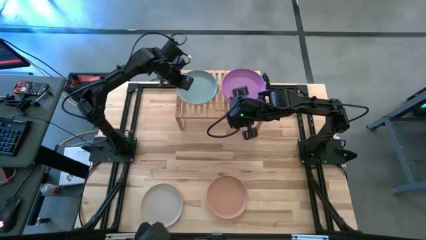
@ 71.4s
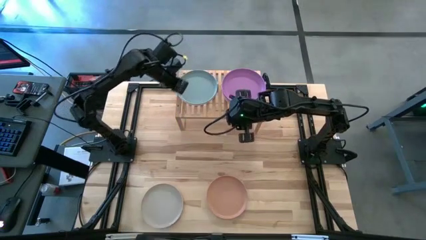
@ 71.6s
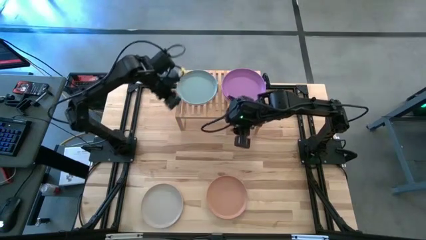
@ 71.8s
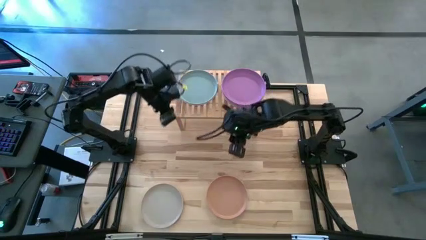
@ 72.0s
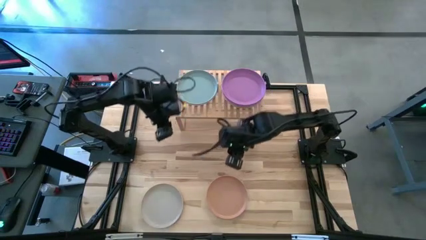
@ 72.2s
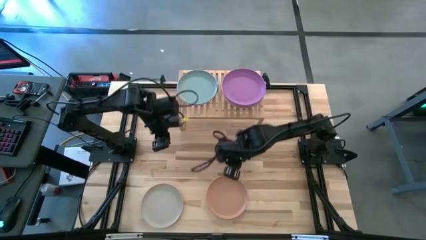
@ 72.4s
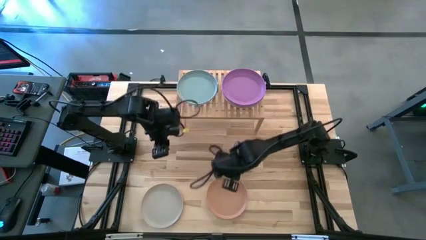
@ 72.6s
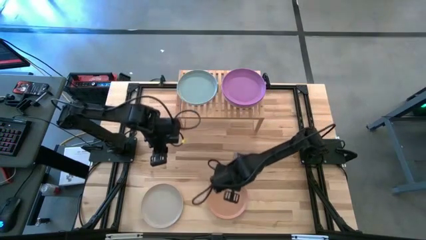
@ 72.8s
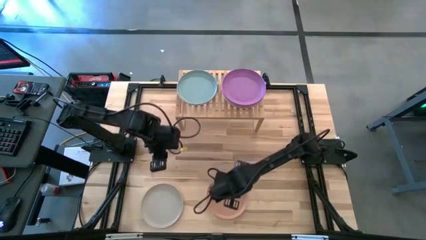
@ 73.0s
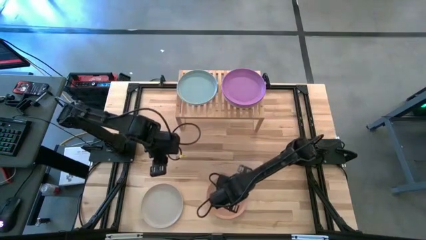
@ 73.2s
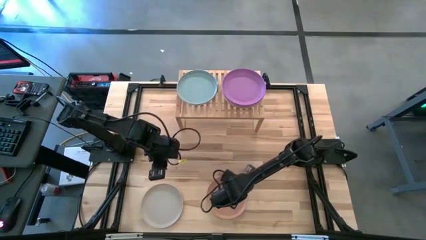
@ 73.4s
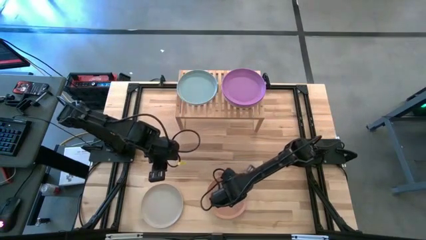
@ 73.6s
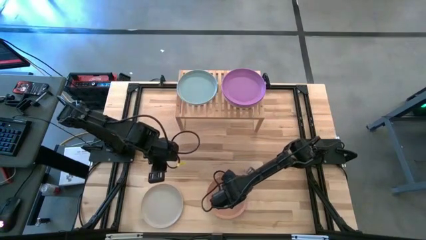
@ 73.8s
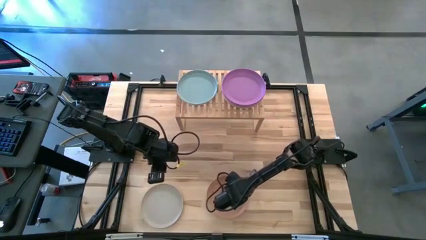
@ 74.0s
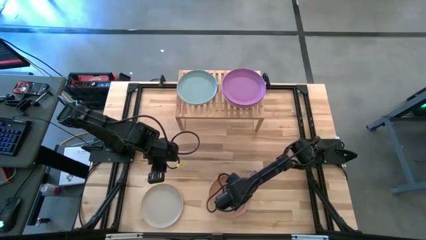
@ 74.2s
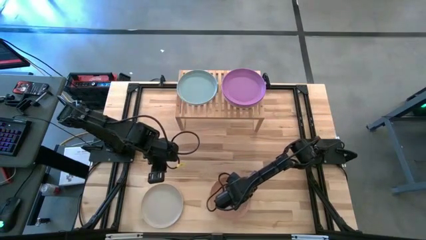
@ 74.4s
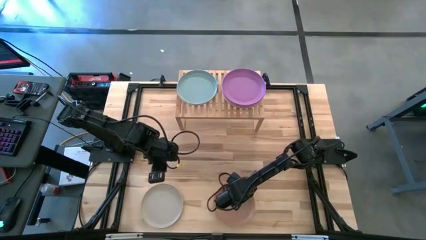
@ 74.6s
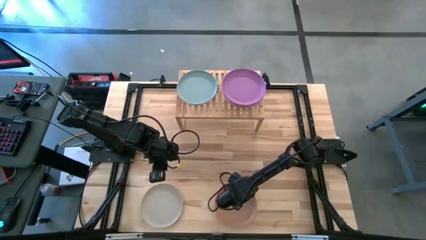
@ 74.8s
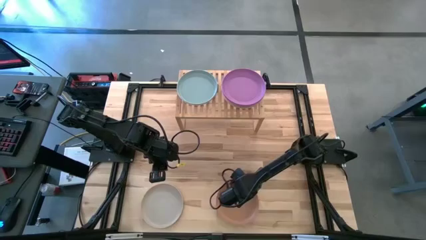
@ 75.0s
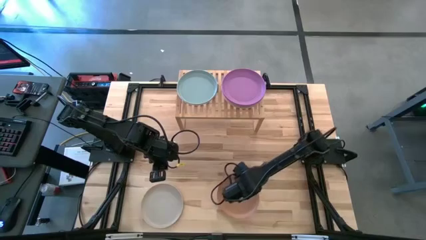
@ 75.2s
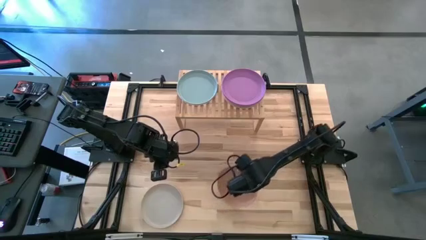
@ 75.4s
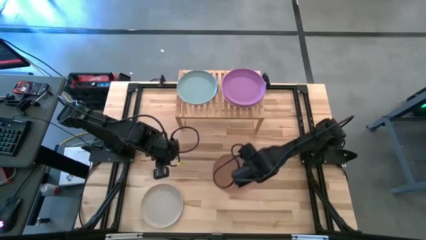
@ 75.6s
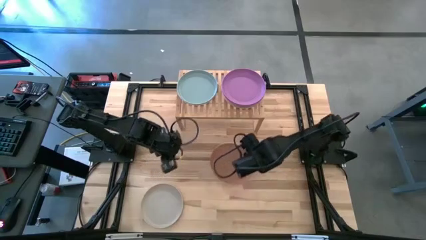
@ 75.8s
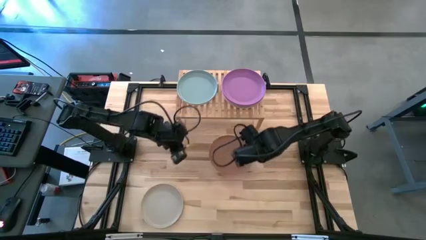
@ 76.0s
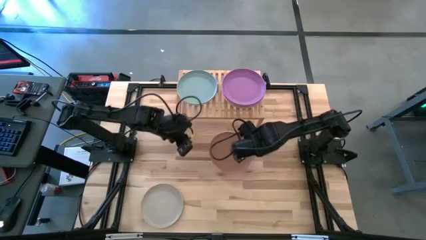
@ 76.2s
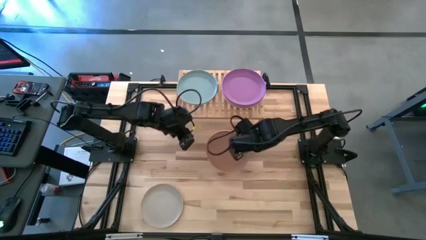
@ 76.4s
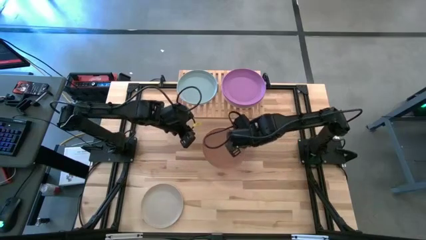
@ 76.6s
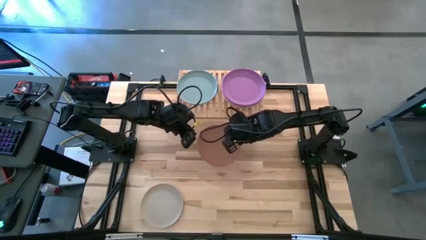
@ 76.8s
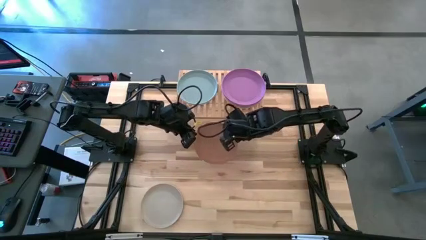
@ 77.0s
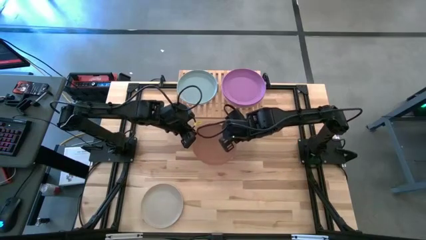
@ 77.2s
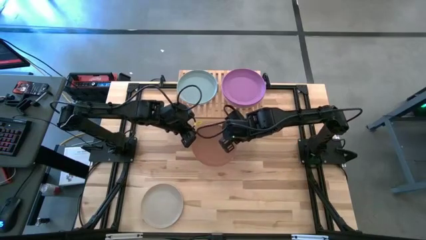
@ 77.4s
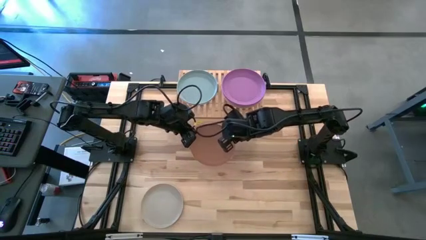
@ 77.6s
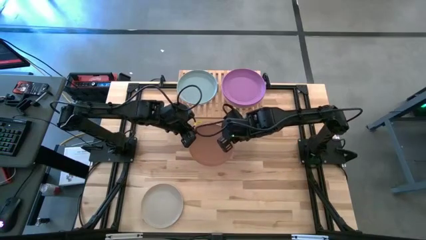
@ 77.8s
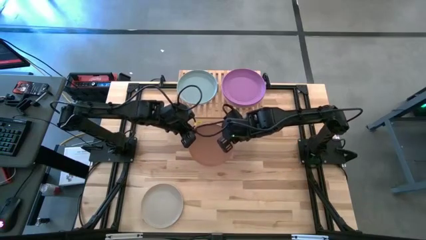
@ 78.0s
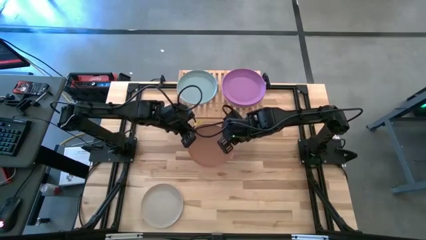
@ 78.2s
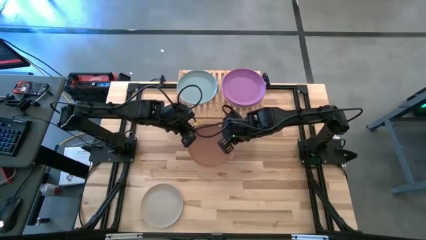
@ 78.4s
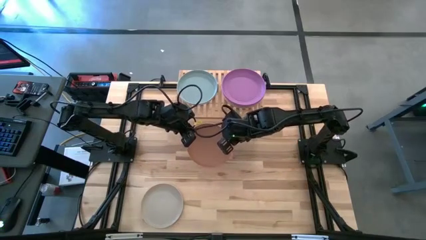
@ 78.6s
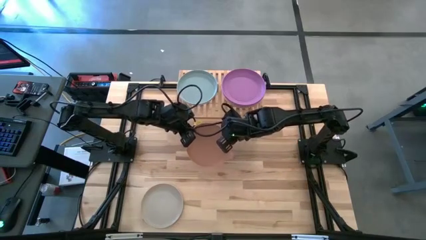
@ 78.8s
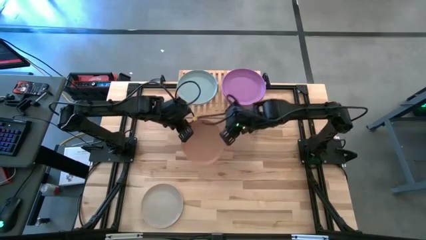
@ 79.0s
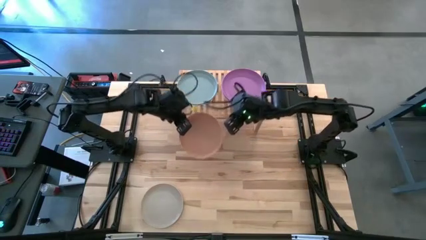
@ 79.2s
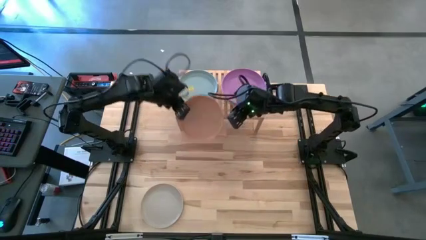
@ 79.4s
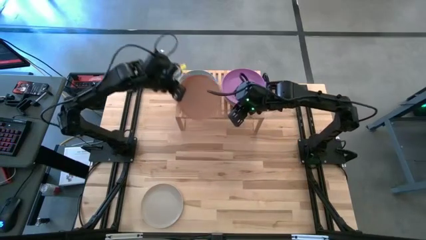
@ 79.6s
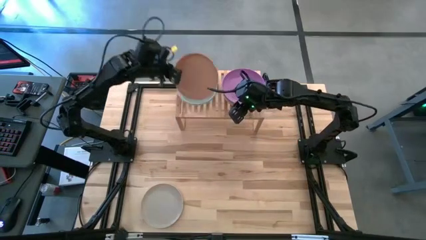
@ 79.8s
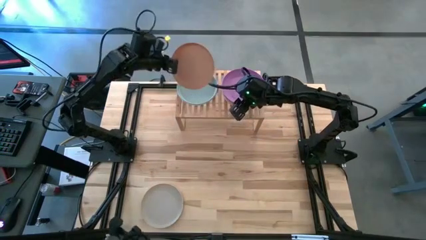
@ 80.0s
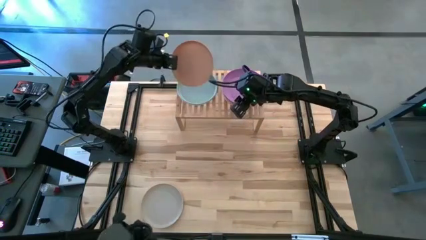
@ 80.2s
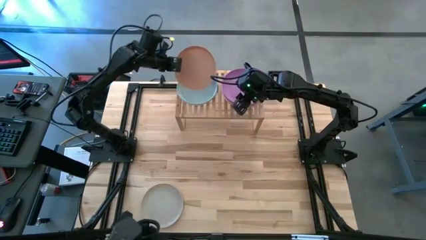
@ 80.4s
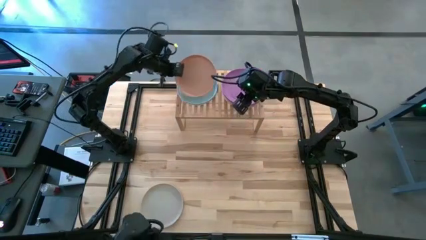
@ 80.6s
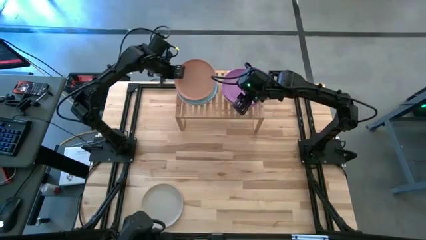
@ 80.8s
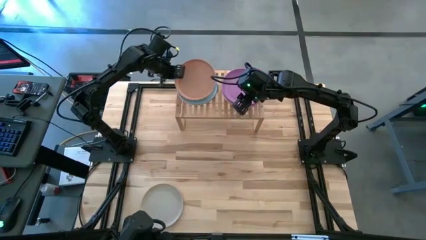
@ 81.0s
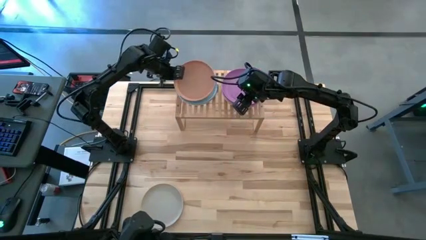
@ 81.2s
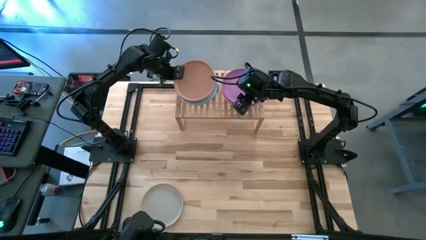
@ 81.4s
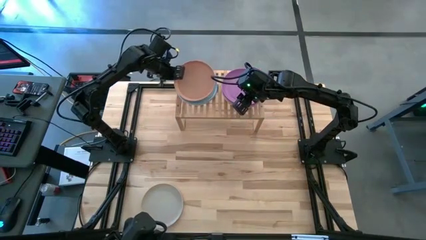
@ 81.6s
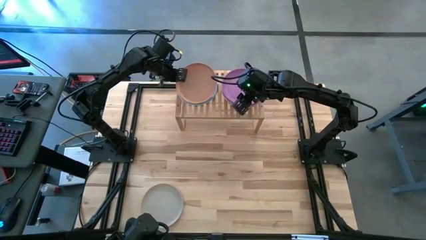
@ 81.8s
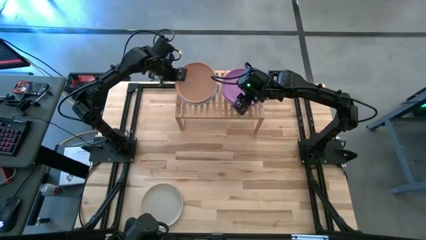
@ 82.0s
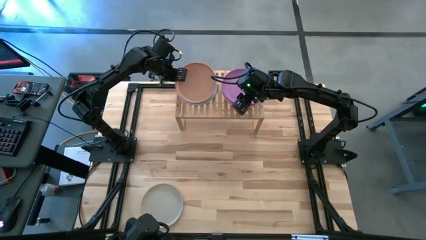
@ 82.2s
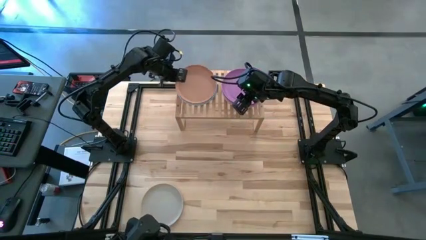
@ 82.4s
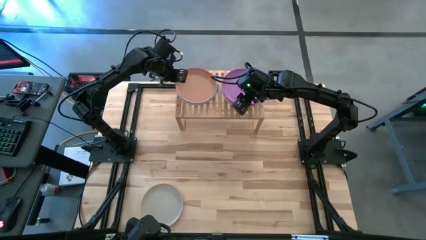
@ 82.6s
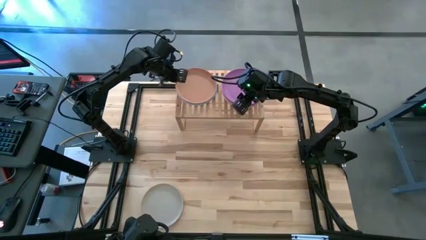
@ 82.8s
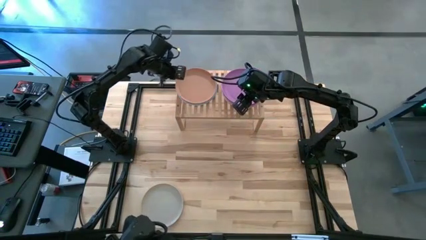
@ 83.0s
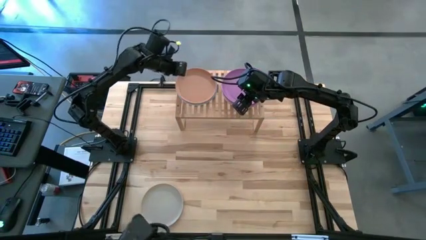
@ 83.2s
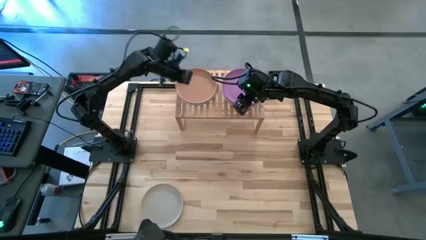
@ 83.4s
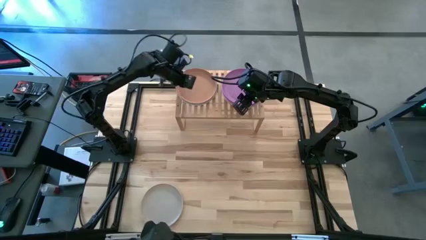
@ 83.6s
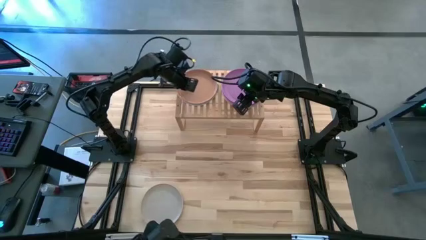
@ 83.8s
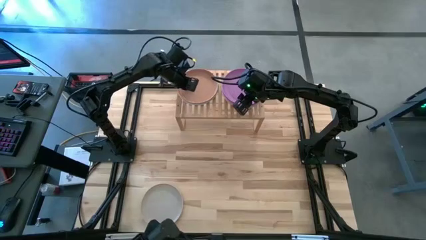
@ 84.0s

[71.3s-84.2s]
Task: Place and stack plates onto a shelf
Stack the brown plate on the light green plate on the shelf
